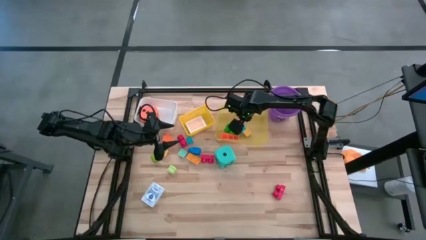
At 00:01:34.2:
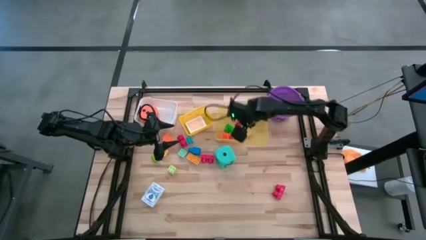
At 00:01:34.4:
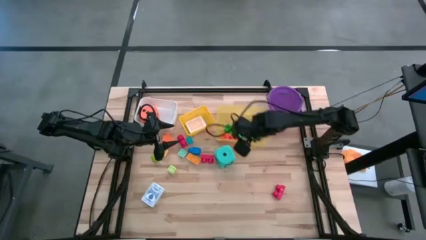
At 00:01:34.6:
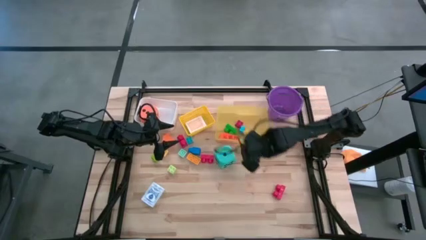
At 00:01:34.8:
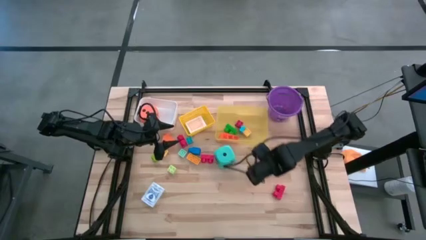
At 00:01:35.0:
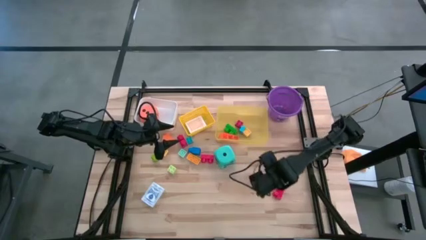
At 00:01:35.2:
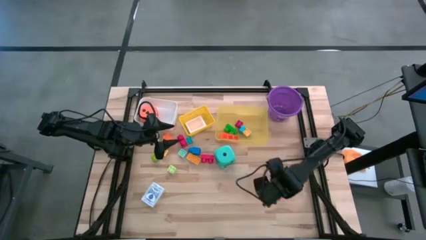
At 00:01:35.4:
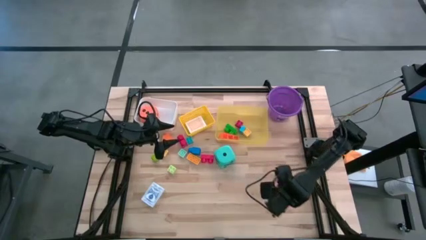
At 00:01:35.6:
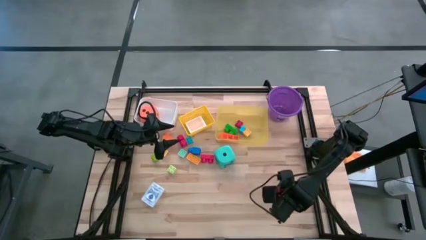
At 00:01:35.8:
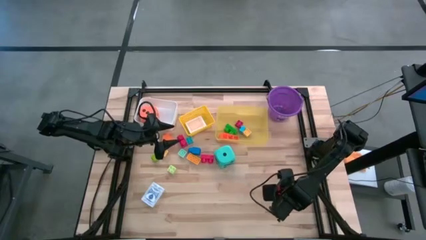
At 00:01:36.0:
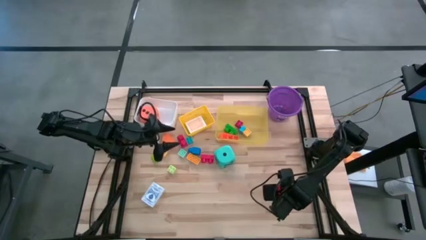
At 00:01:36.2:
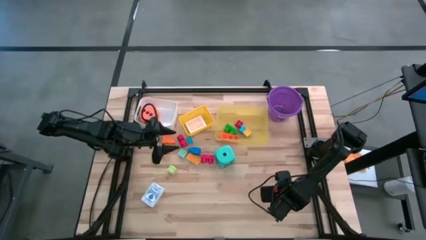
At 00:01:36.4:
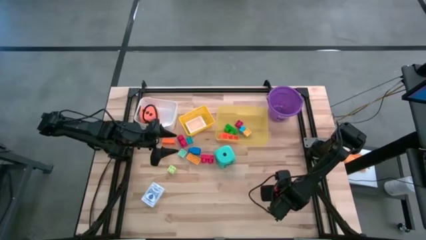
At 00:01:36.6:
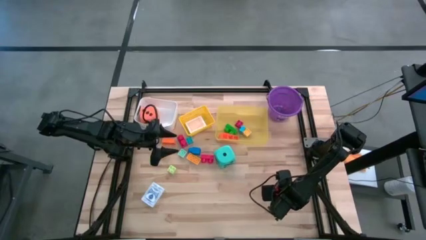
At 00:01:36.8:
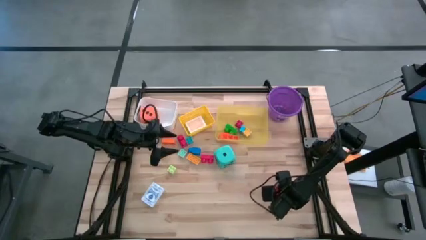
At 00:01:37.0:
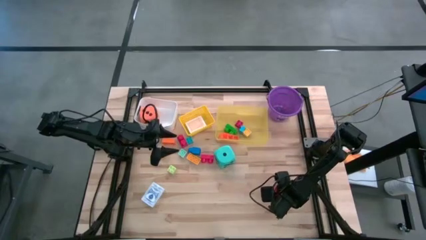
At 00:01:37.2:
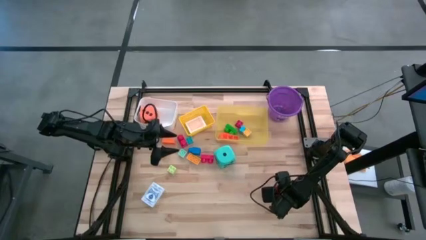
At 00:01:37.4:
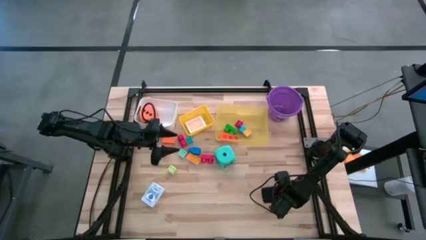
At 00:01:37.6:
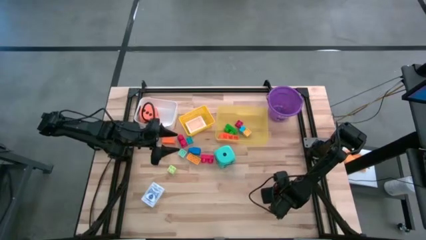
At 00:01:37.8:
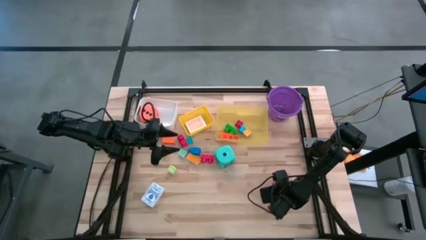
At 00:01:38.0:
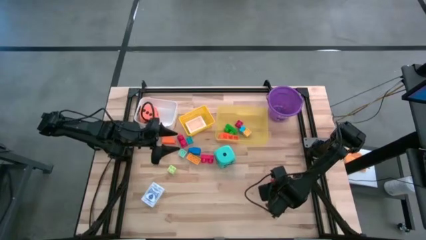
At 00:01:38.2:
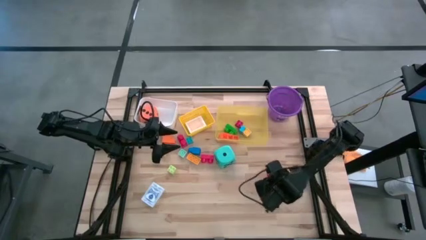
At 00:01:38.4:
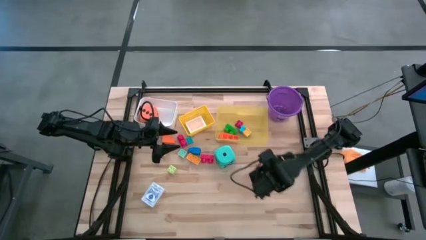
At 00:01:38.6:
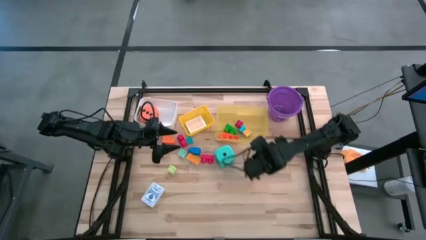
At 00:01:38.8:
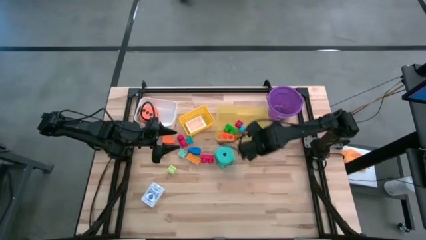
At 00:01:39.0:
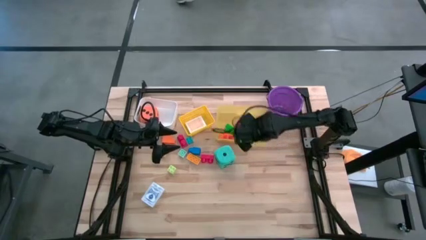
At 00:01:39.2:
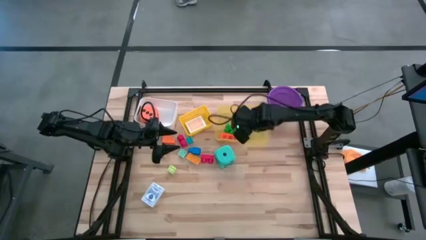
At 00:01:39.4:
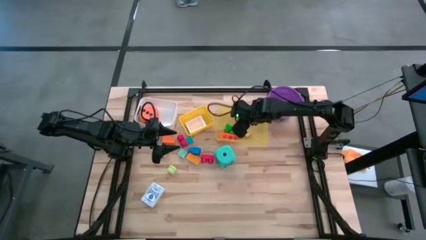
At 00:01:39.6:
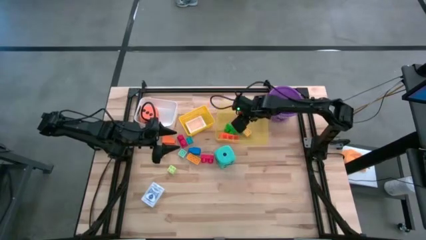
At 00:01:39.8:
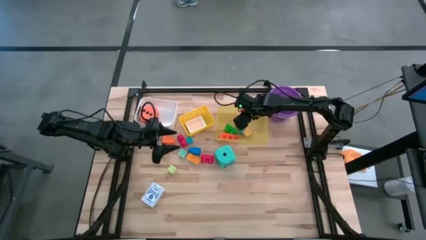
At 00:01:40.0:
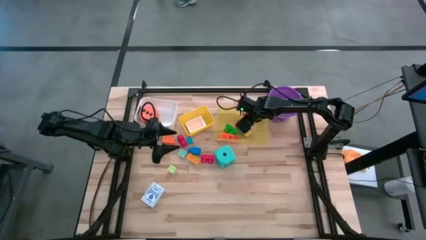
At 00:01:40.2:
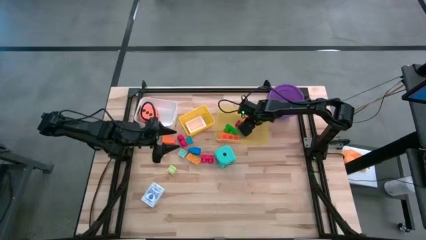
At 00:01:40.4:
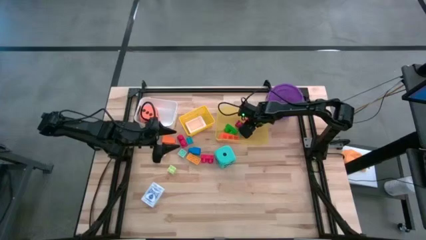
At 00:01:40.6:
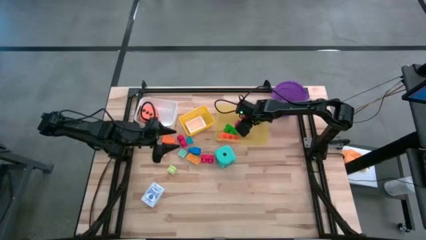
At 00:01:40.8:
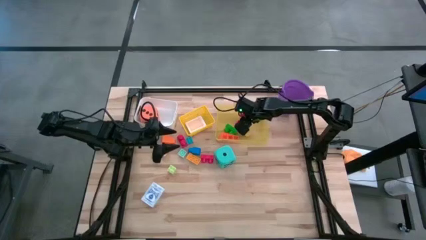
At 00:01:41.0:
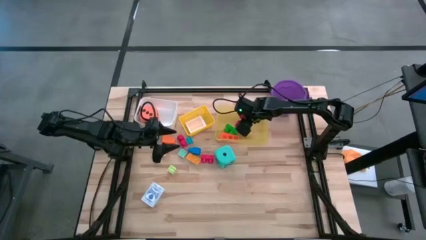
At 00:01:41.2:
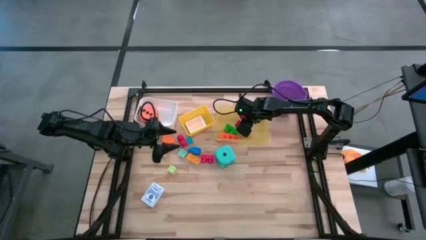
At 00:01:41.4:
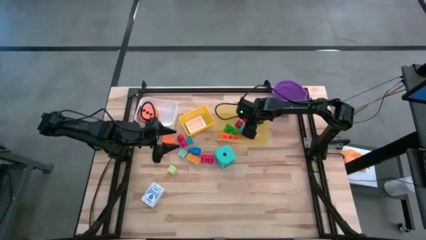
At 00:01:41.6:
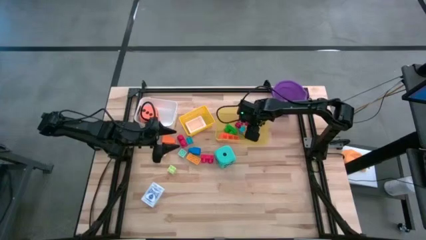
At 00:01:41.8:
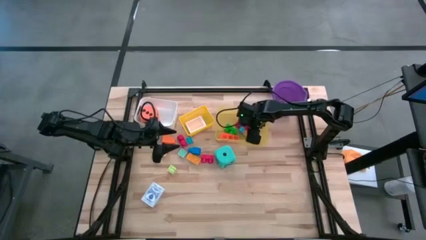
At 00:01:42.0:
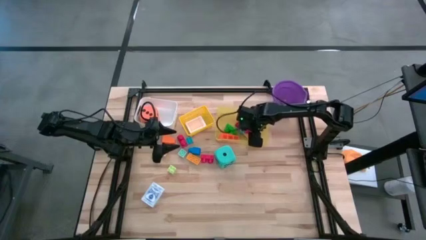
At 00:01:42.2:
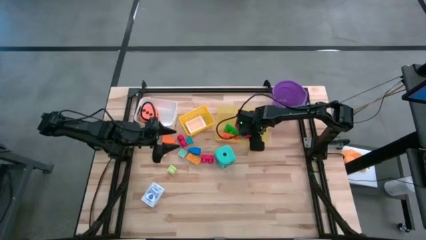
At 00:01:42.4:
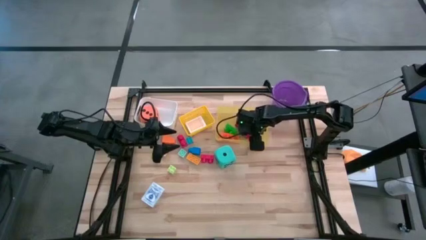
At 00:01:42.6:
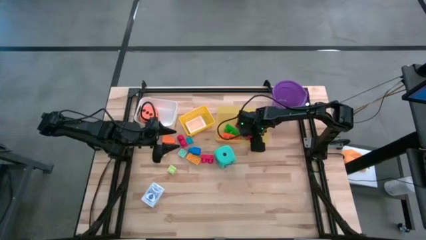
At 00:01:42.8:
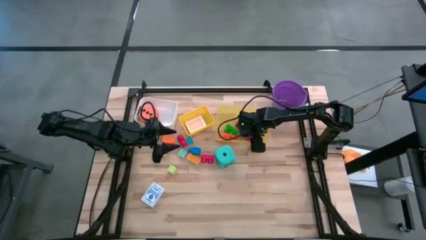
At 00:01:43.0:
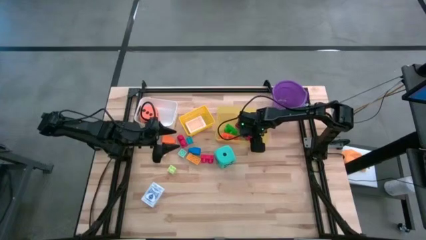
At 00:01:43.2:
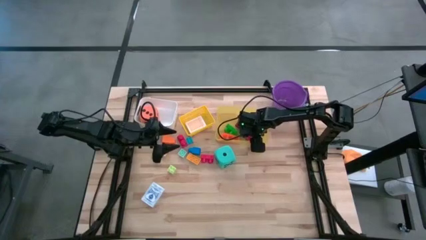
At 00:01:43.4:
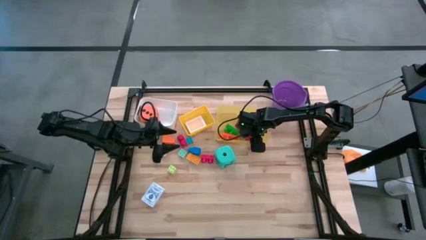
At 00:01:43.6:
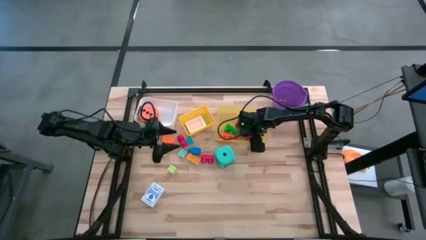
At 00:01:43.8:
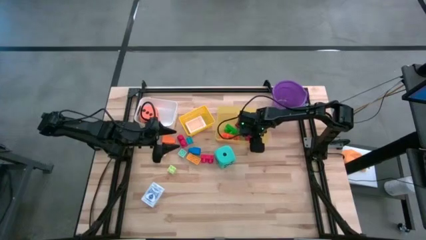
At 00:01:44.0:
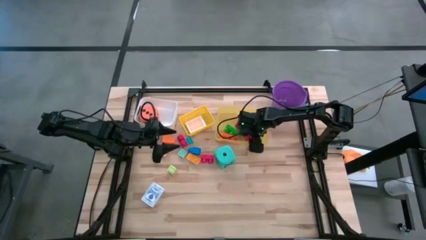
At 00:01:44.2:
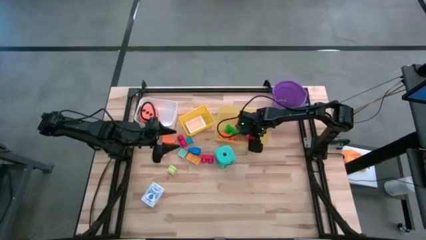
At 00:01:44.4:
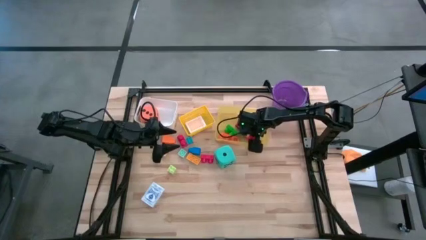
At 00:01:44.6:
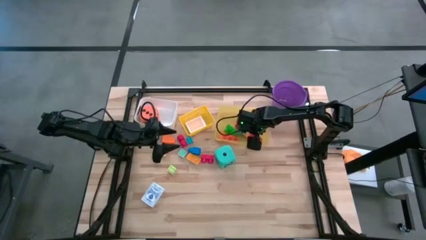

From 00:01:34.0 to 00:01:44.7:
Task: Pick & Place Toys
Put the red game piece into the yellow bin

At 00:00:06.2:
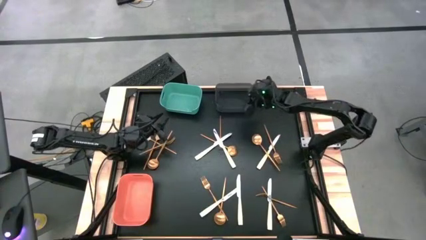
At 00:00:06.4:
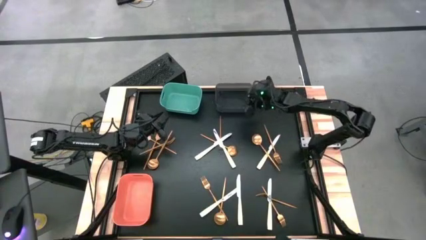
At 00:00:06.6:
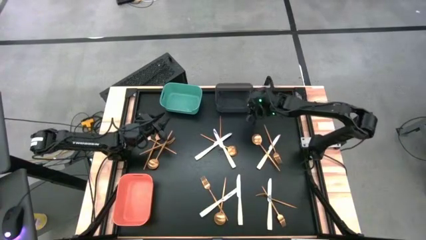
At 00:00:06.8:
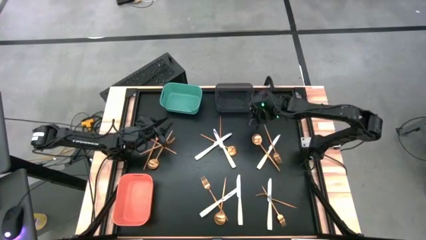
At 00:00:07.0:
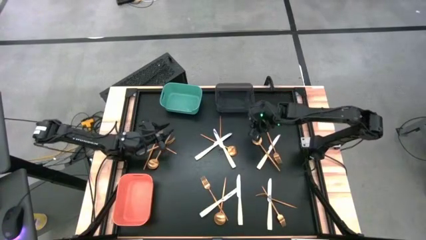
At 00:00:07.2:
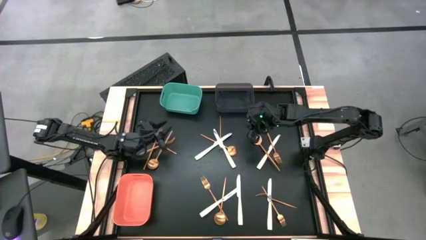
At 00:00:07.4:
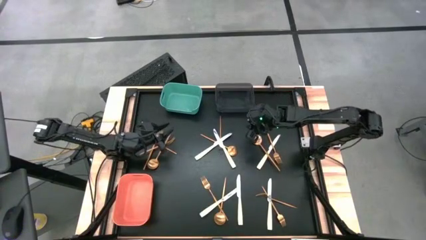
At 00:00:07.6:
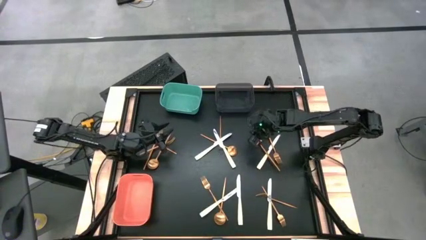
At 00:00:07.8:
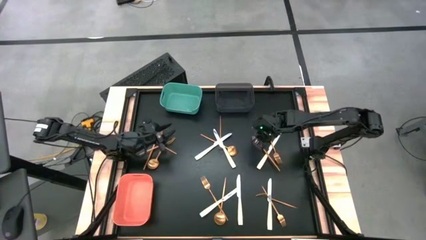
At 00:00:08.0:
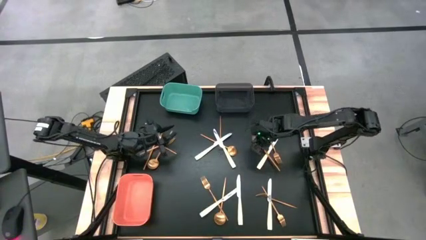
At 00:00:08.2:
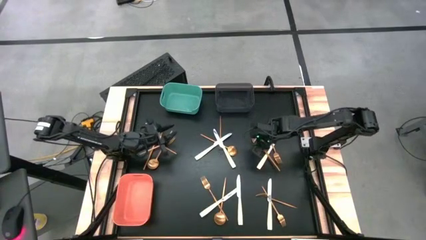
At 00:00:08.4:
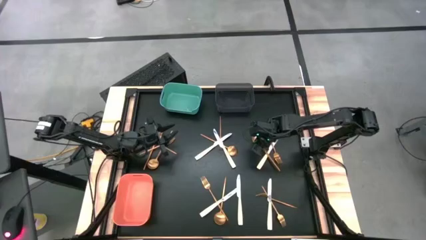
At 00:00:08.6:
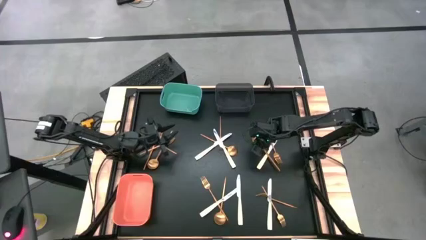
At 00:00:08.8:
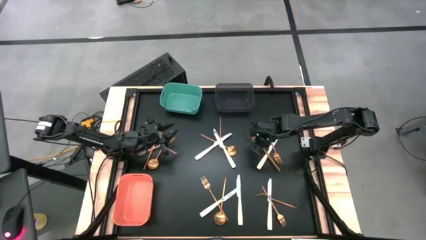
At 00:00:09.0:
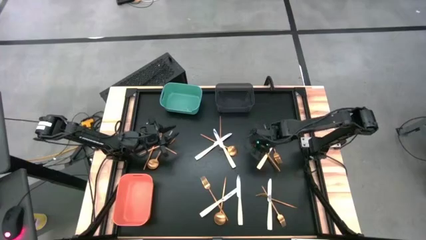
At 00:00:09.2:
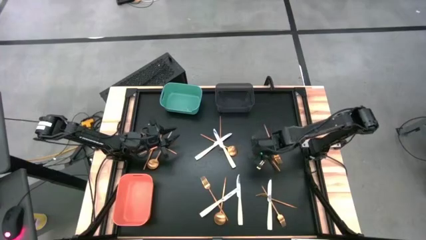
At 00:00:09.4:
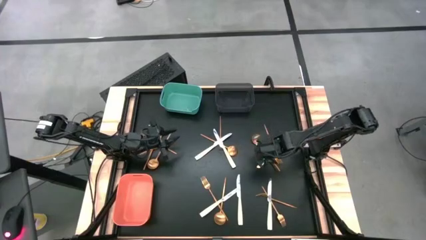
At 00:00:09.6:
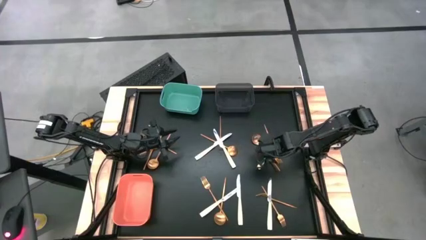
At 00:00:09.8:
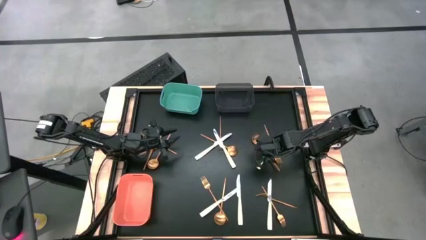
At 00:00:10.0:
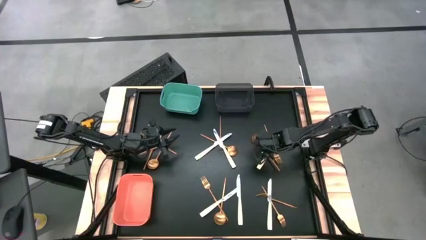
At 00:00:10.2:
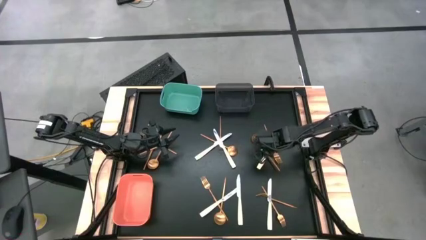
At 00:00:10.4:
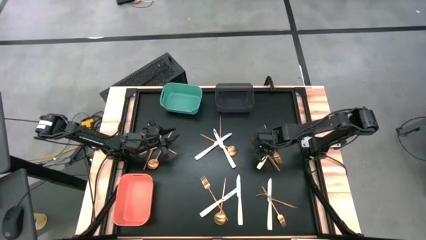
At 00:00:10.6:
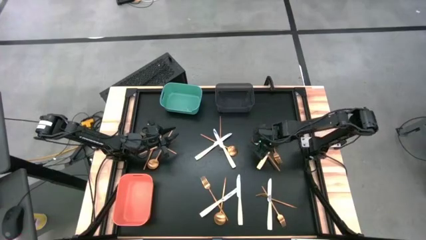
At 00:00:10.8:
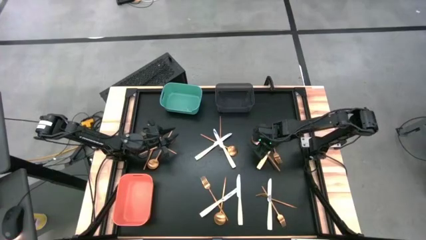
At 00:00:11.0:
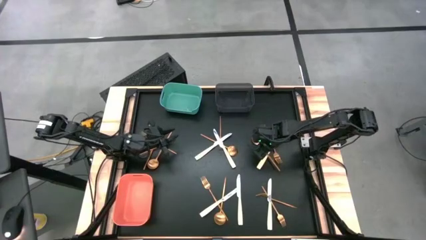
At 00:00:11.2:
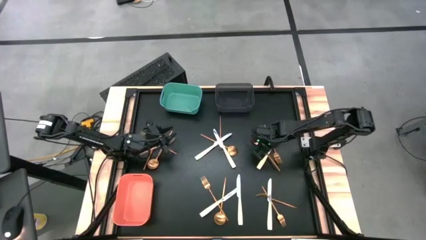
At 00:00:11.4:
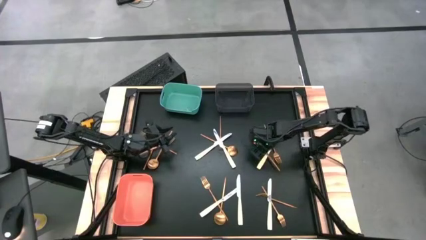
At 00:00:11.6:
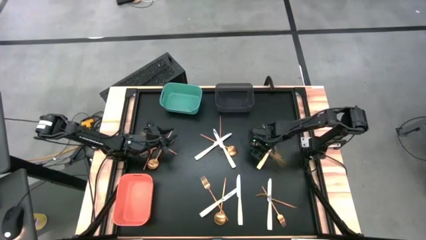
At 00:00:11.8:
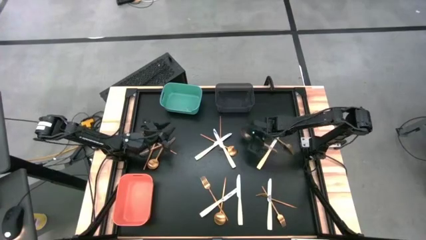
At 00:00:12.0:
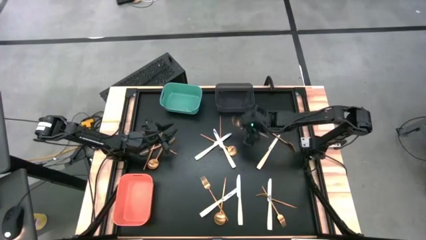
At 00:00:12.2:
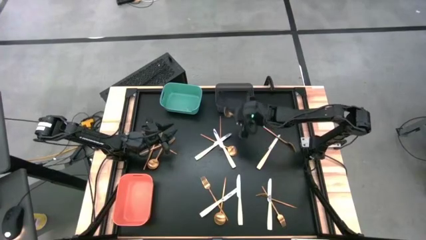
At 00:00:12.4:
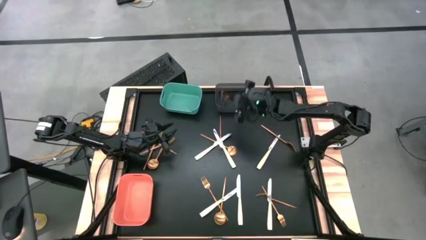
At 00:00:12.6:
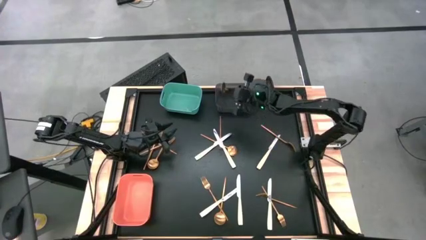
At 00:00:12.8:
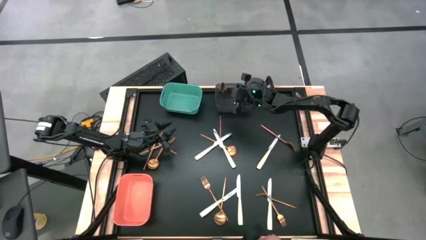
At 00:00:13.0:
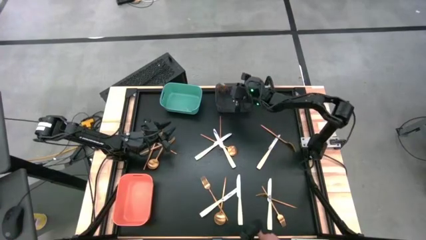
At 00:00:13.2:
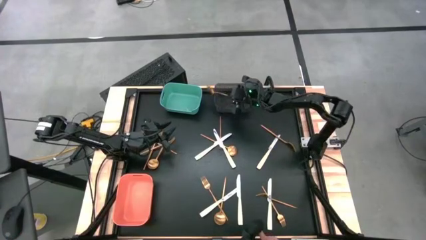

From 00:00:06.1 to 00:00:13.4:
Task: Sort silverware by color (type)
Put the gold spoon into the black bin
